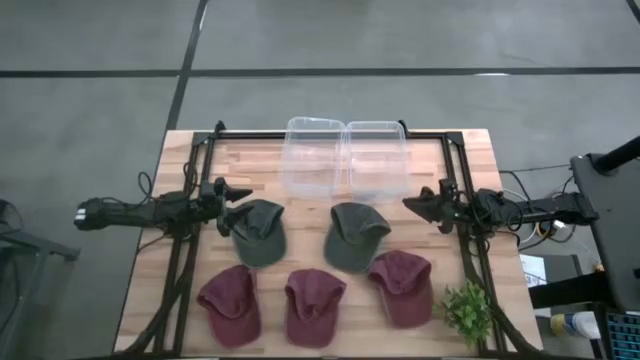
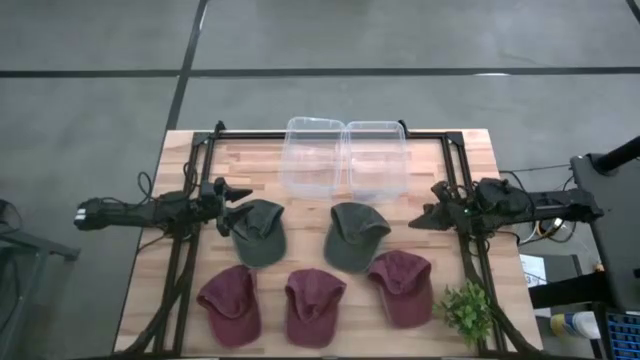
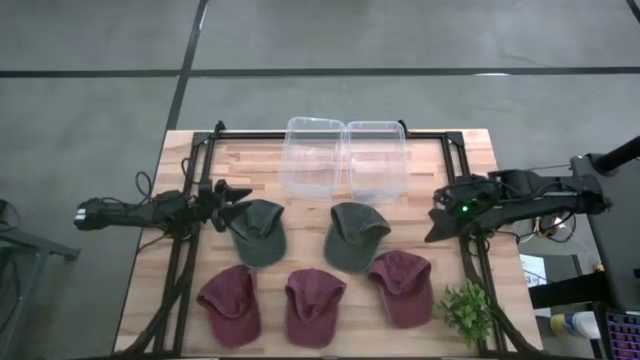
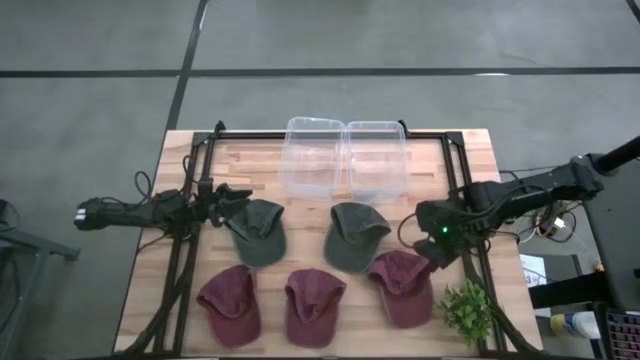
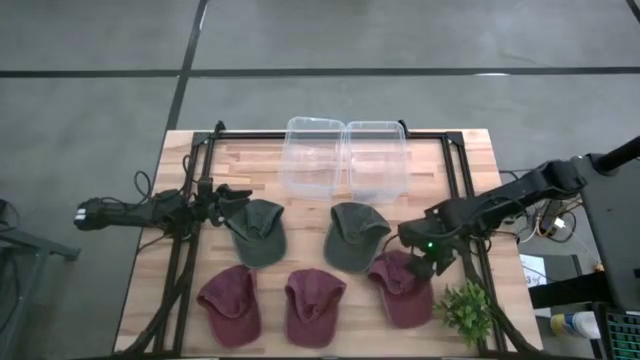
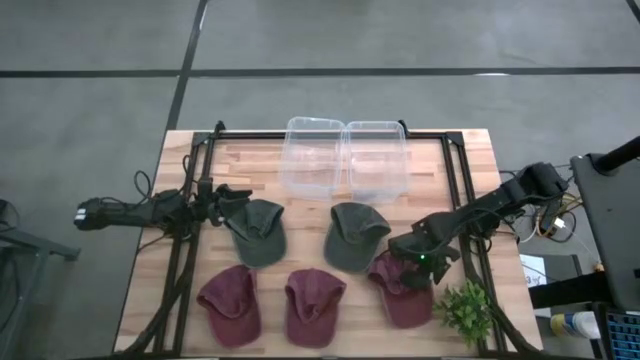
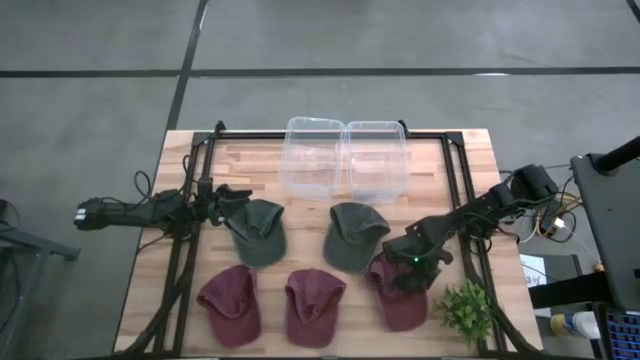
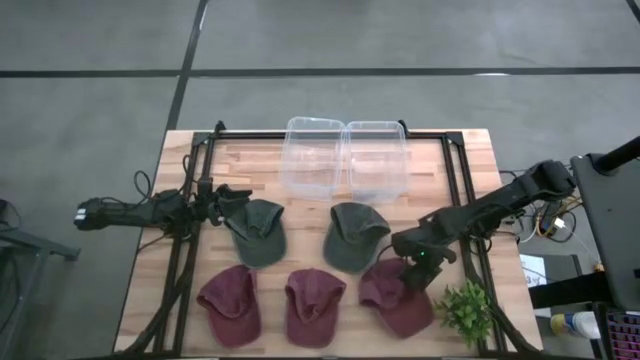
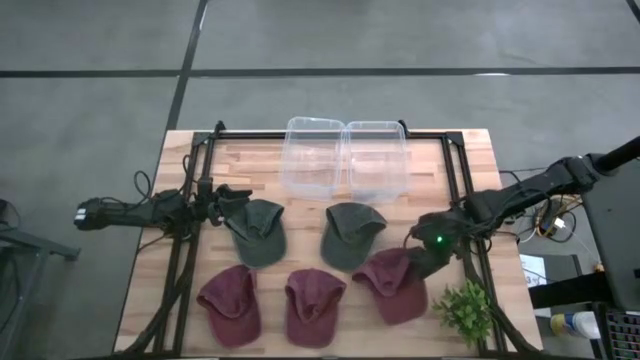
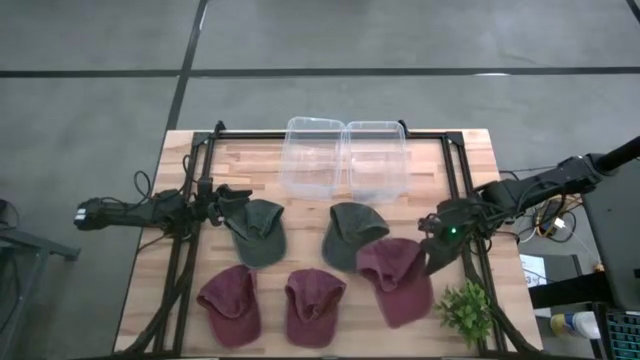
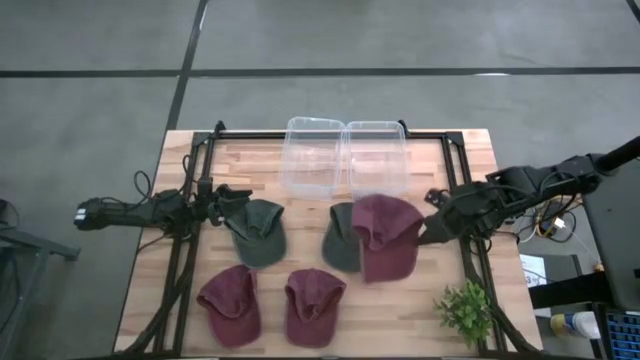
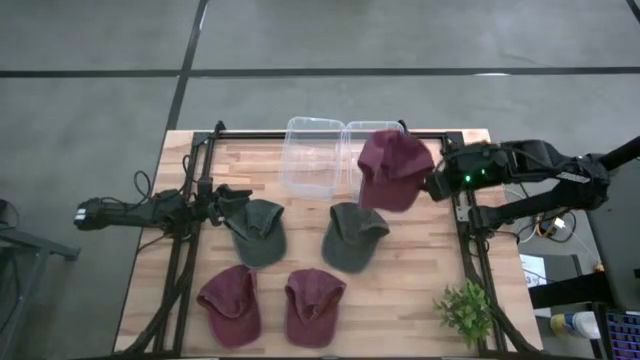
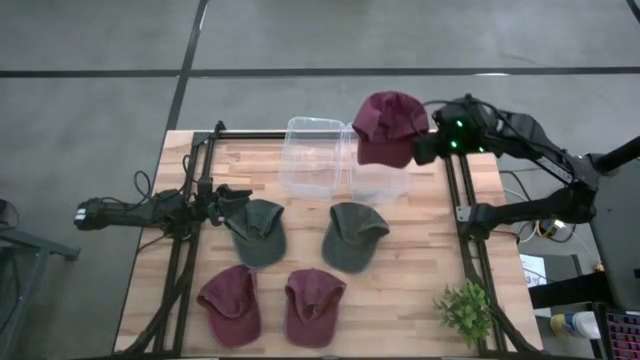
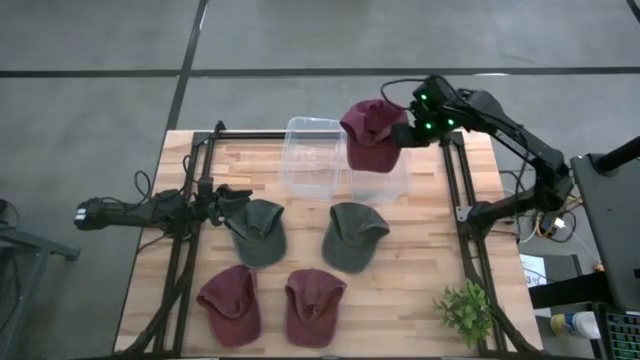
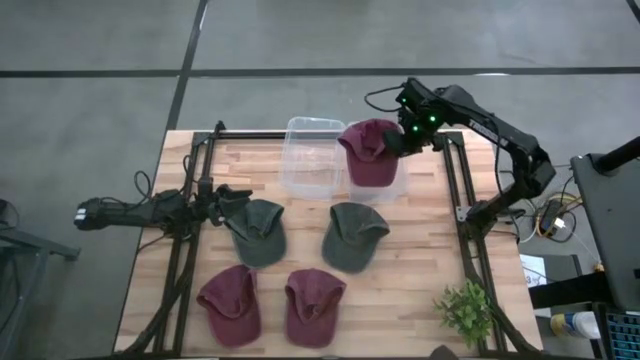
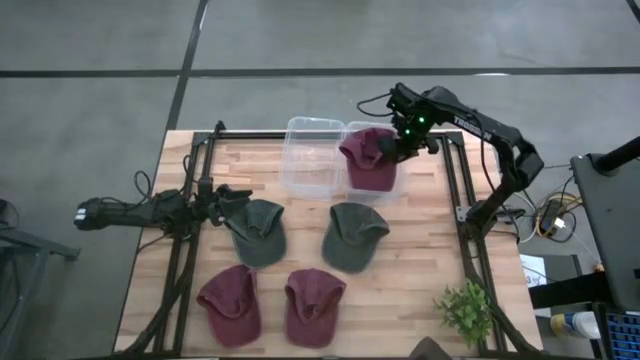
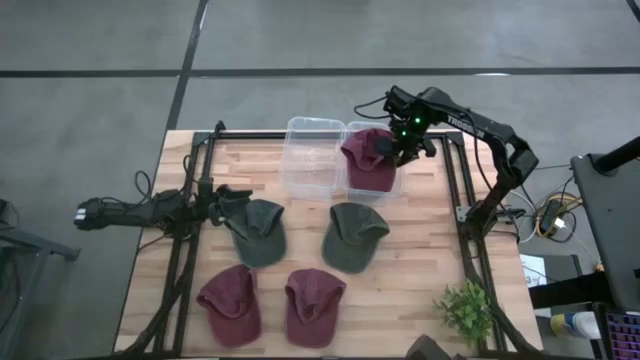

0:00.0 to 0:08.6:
Task: Pick & Place hat
Put the right red cap into the right transparent bin
